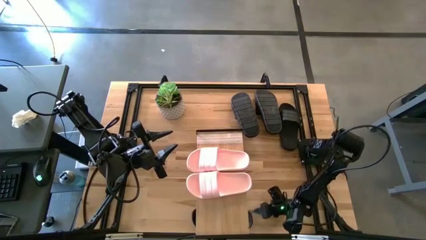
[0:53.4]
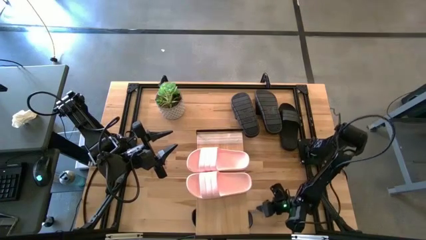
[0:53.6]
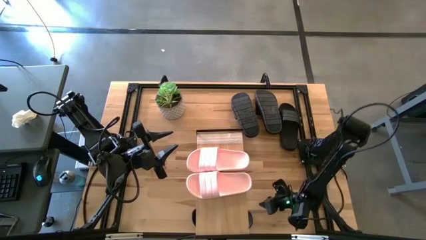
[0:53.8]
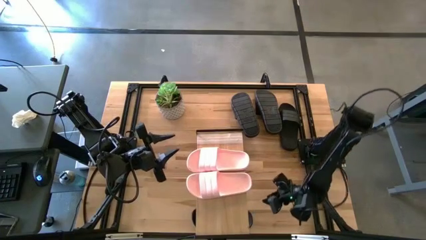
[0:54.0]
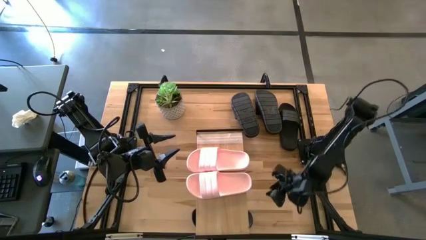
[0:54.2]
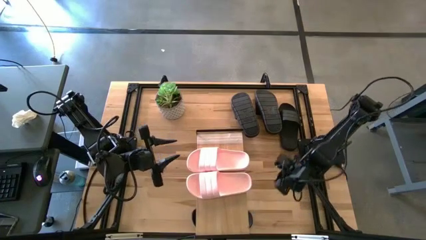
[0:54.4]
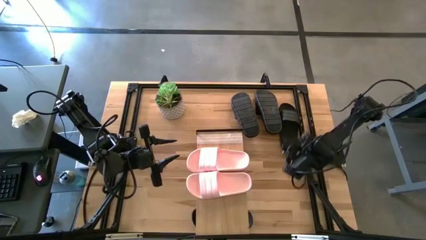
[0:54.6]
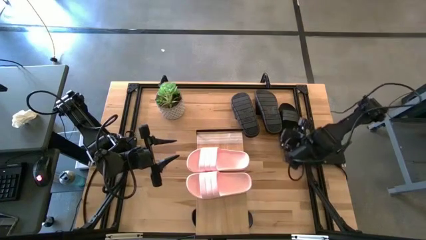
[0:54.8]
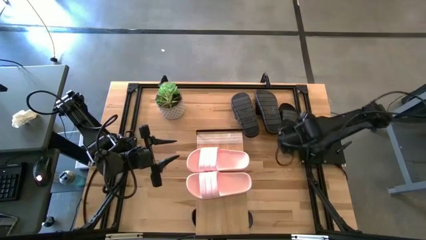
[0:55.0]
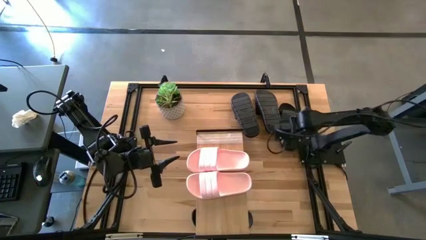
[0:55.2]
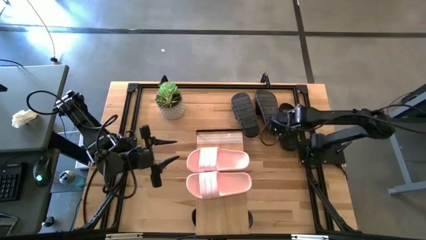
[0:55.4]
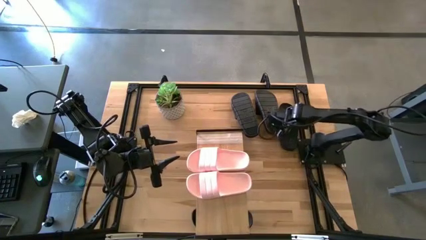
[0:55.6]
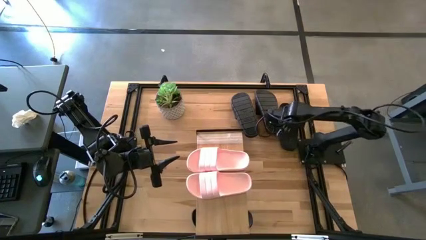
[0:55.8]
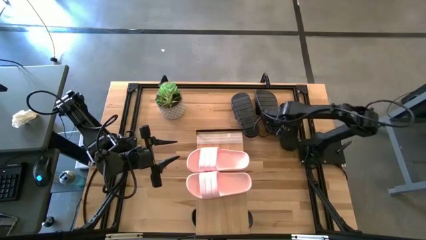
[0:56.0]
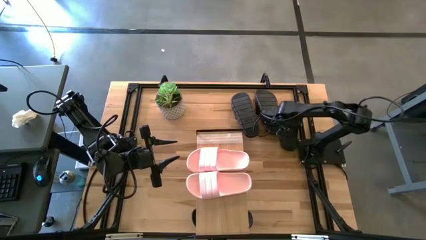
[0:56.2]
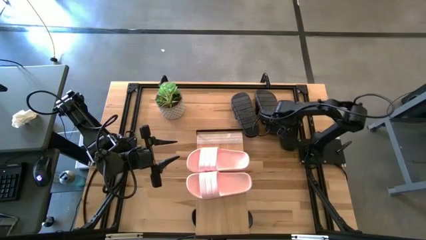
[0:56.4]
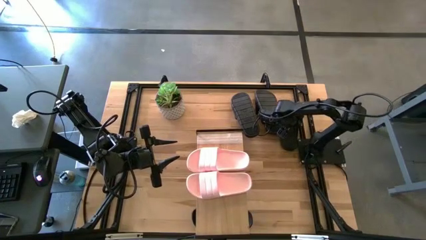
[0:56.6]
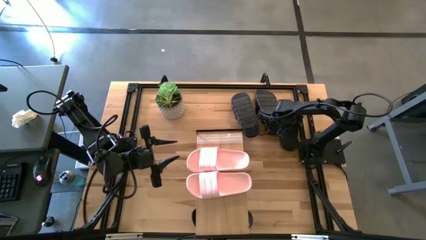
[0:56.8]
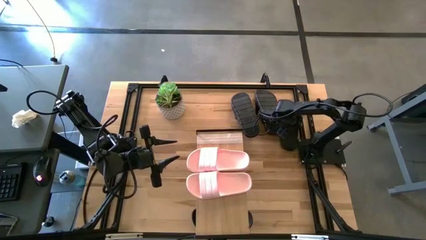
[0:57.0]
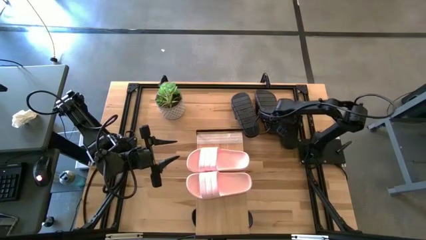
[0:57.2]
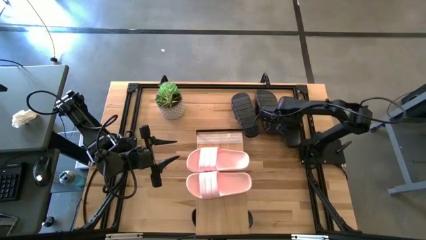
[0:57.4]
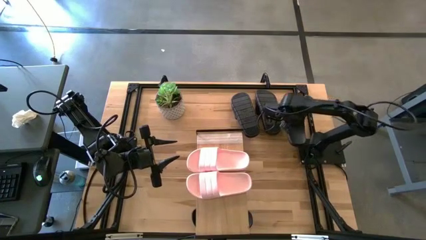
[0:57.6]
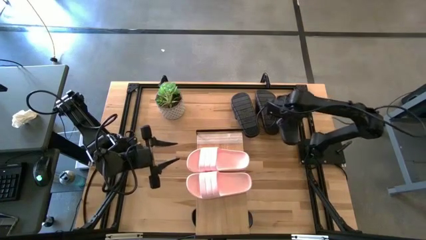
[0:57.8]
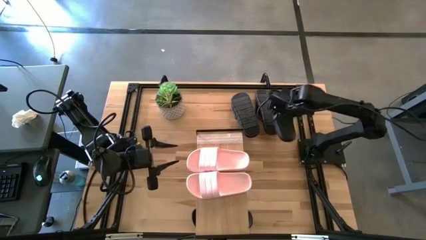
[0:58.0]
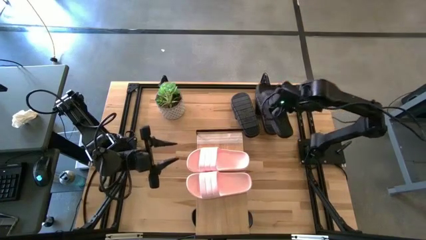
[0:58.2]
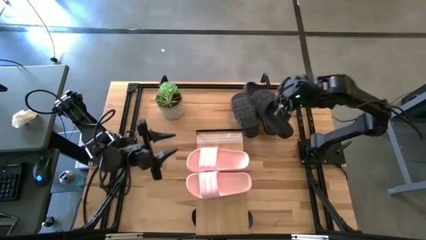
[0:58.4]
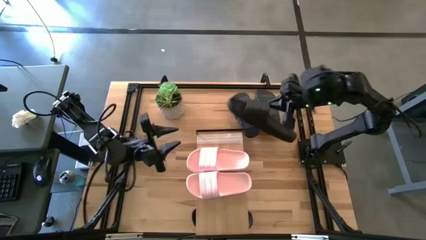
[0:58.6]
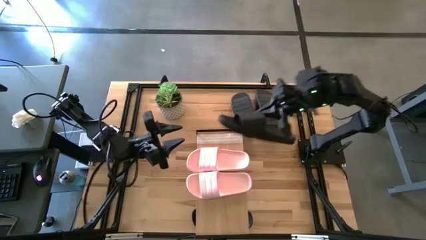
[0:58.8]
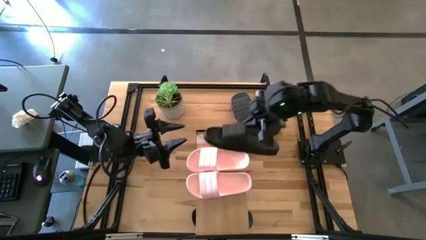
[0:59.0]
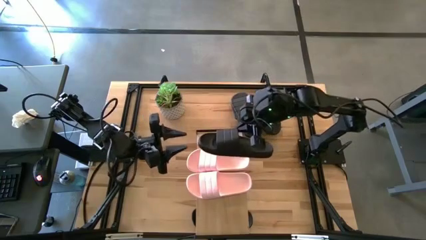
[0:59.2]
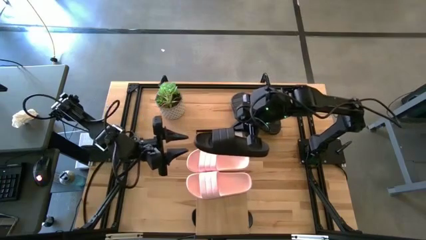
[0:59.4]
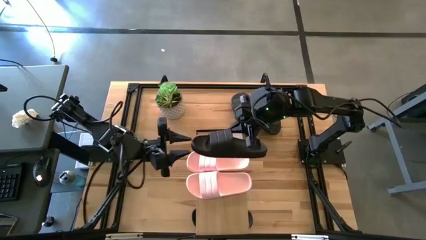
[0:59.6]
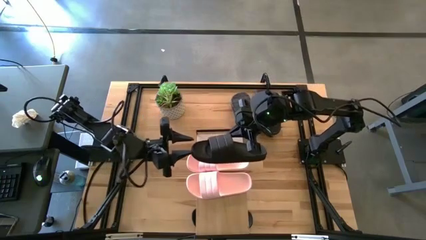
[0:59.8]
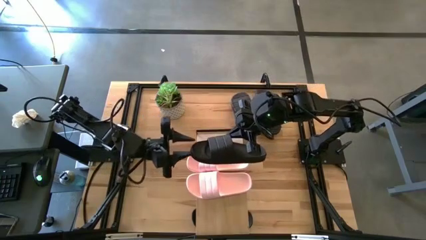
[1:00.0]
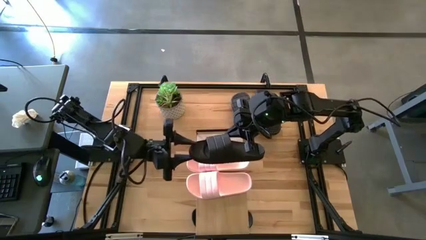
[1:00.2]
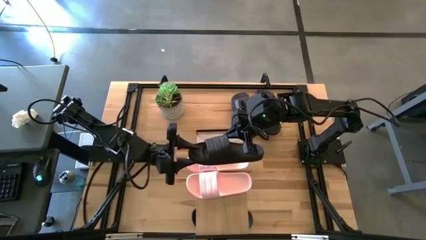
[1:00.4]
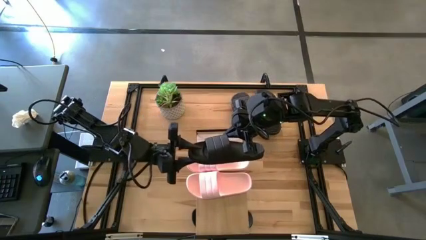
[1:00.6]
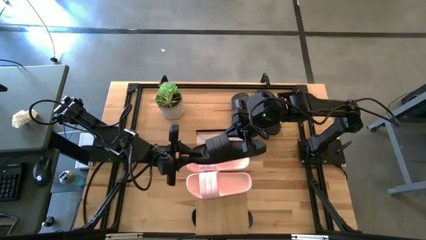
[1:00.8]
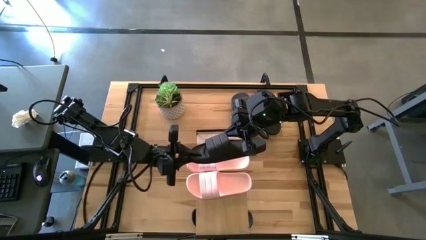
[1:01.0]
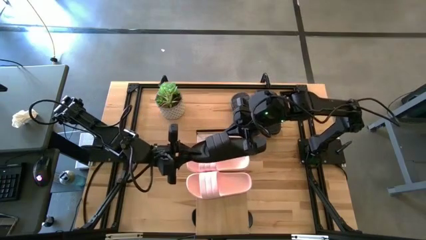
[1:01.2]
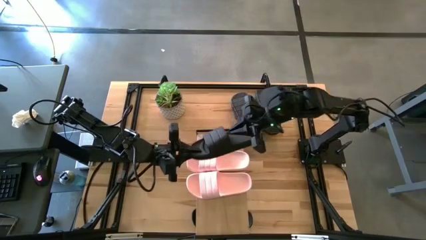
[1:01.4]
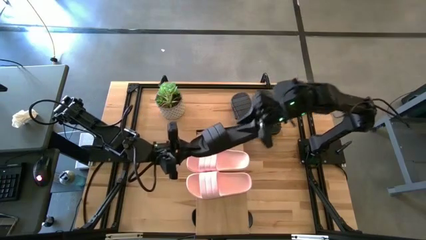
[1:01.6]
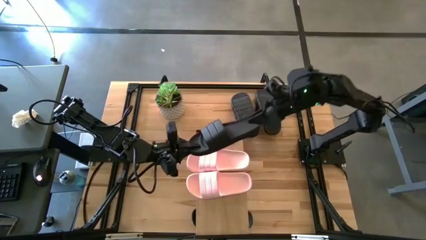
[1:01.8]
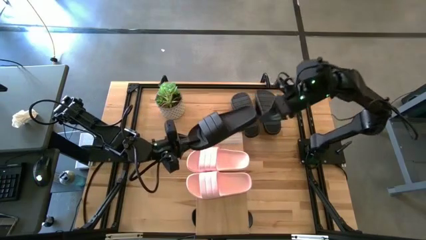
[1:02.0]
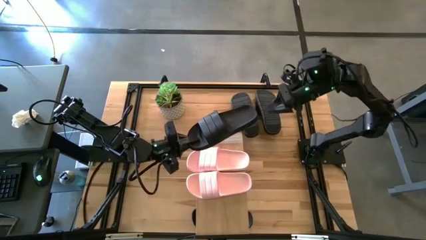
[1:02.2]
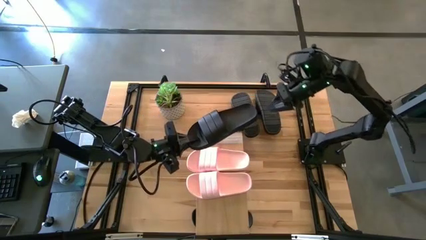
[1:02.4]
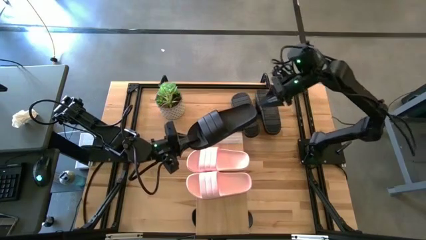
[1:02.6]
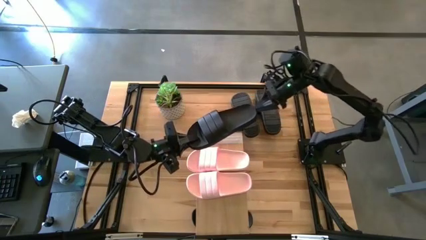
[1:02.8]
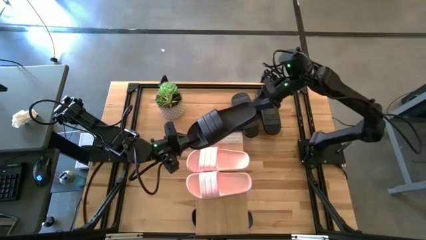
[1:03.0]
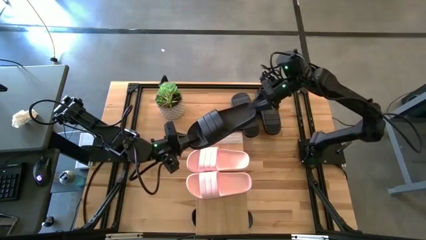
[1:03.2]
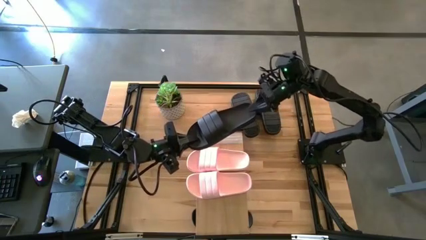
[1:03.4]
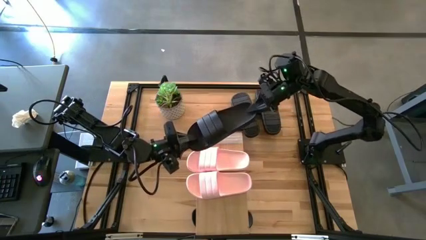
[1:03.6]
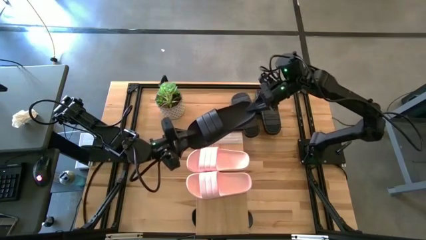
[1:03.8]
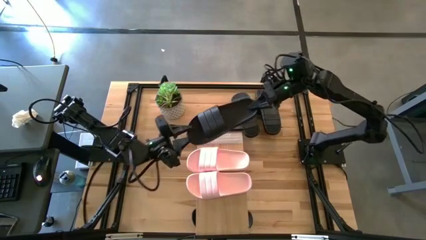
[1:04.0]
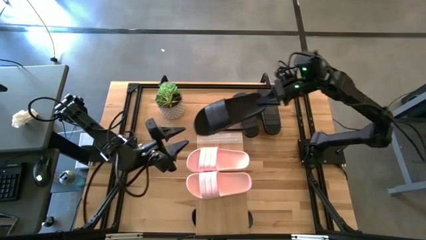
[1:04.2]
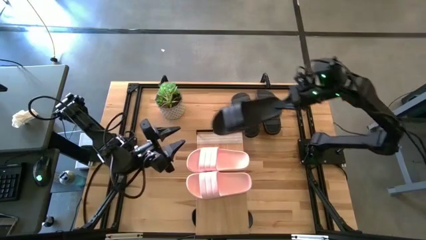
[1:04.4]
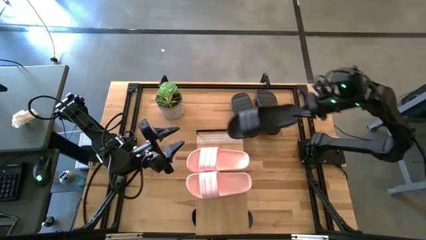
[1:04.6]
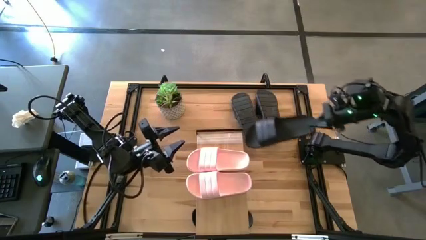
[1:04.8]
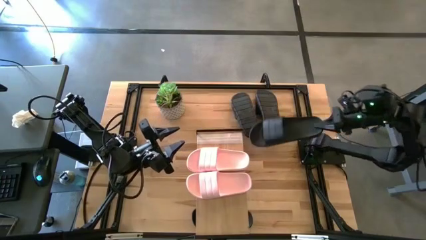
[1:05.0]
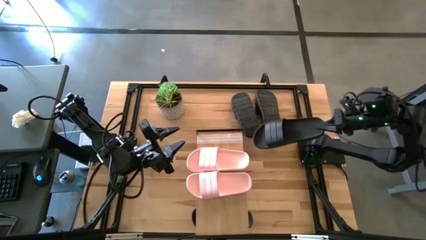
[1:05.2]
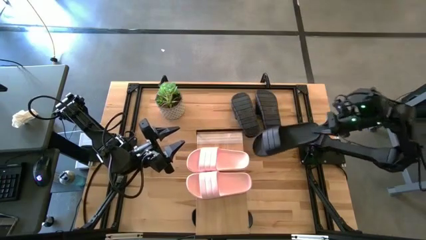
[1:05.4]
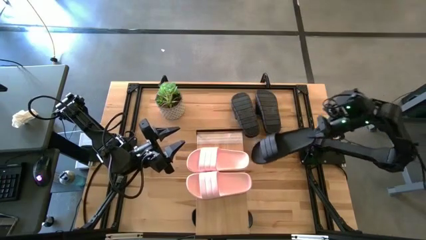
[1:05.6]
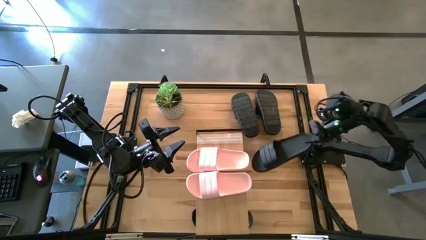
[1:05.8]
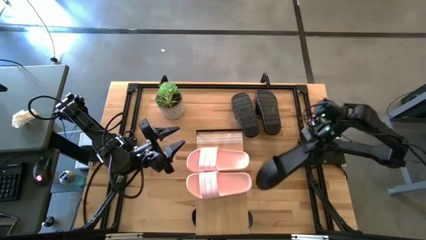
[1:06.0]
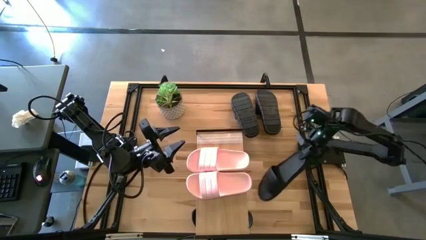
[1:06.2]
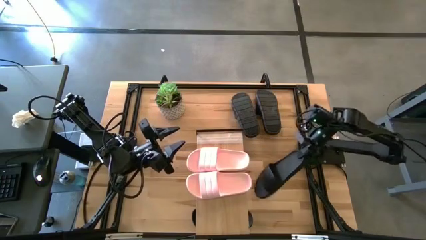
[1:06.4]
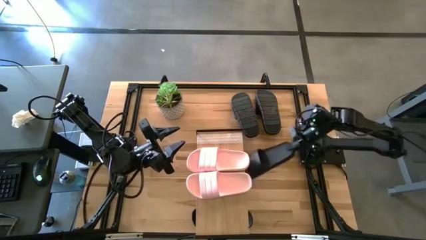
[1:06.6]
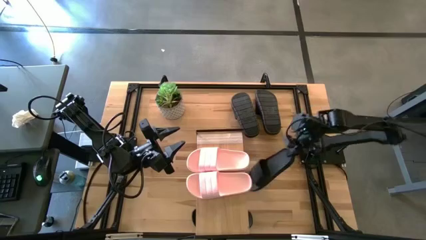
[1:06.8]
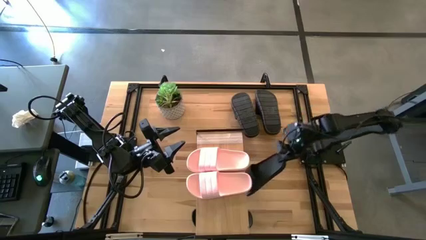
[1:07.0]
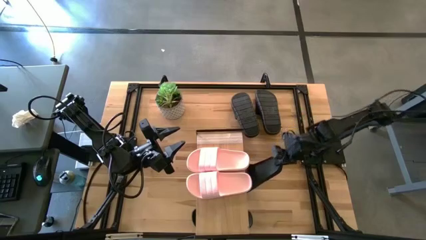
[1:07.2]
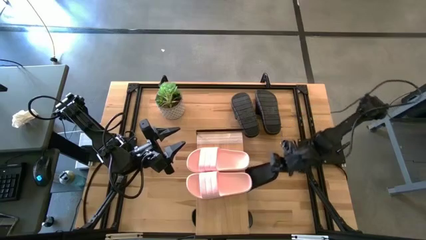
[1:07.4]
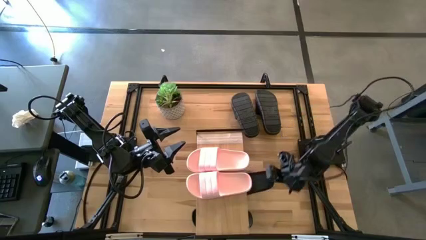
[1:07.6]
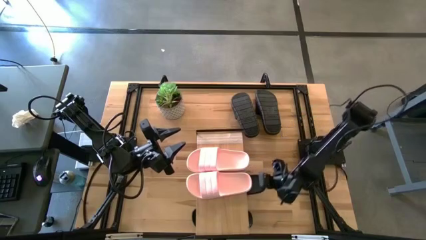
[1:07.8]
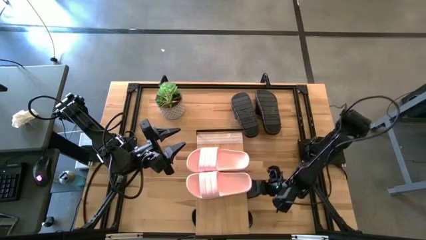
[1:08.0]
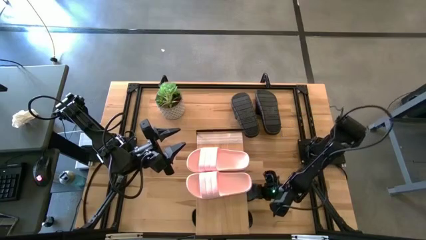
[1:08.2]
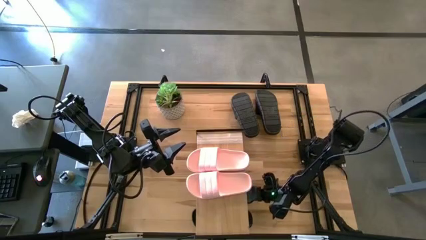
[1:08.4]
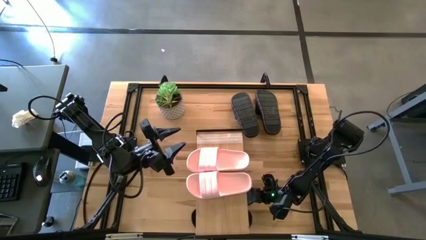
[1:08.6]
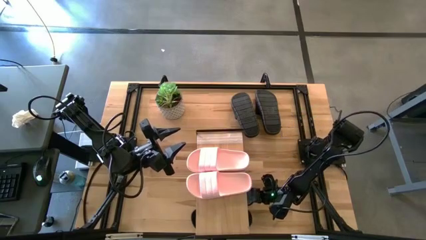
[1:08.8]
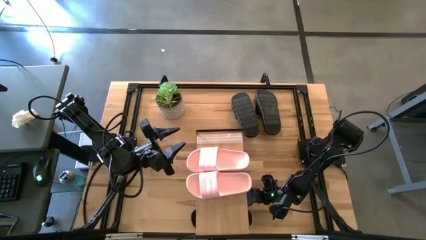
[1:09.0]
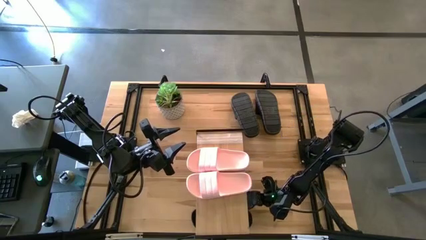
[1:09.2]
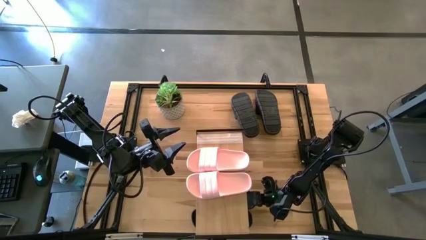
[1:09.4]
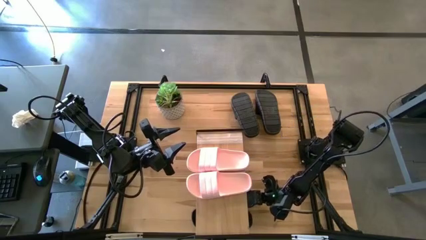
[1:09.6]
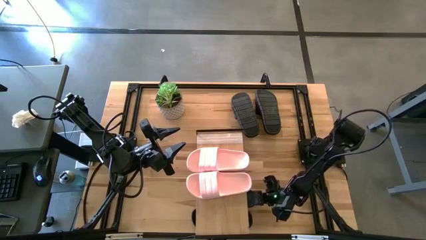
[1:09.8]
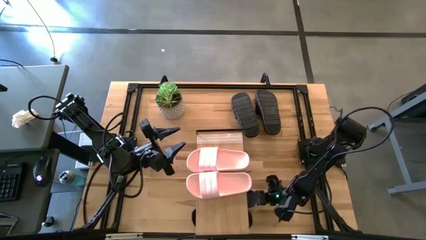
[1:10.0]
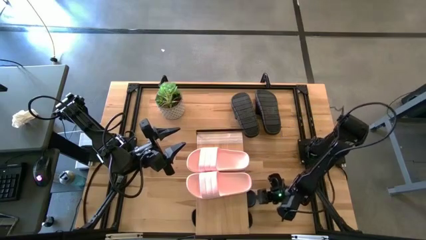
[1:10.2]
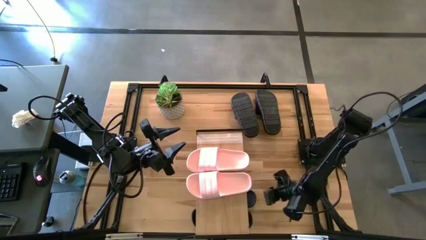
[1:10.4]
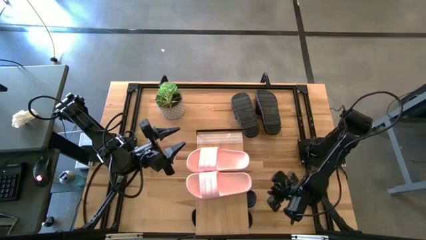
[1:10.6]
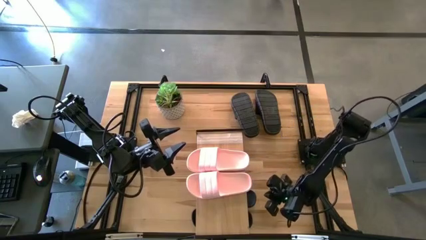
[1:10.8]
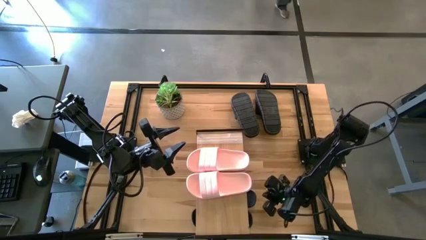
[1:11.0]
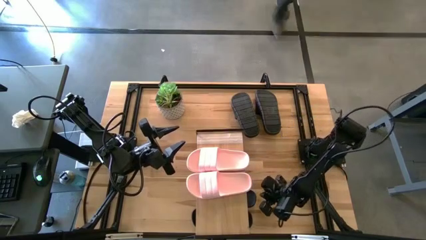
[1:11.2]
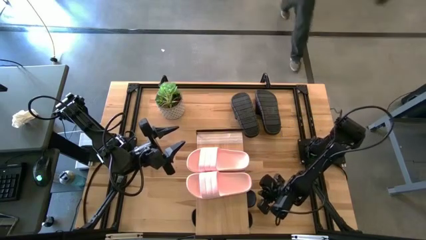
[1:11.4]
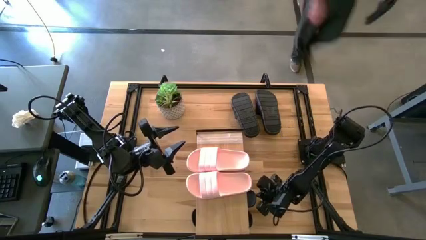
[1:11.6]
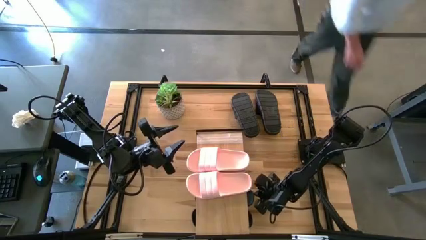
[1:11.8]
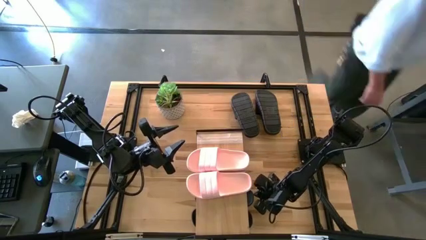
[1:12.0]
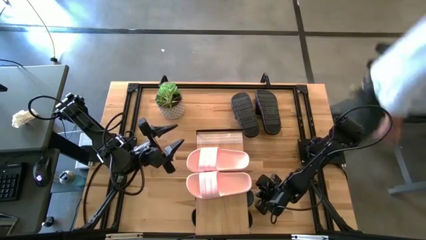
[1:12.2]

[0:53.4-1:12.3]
Task: Pick and place slides into the shelf
Put the black slipper under the shelf
